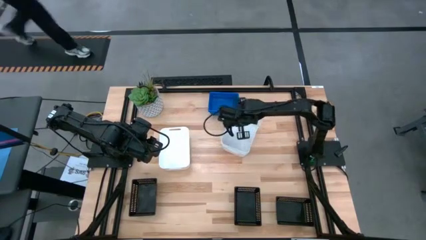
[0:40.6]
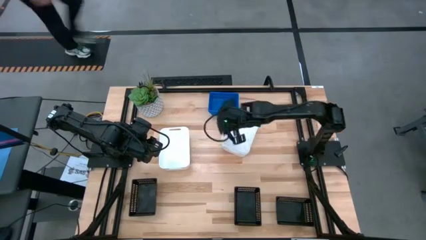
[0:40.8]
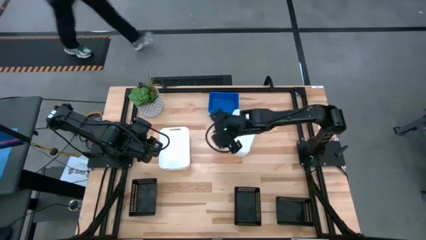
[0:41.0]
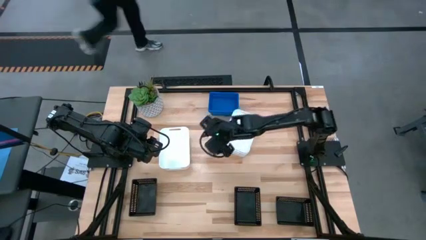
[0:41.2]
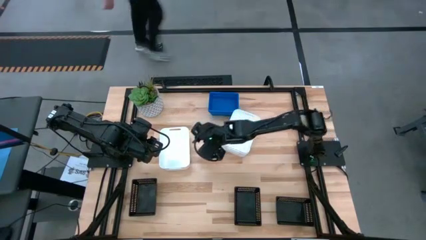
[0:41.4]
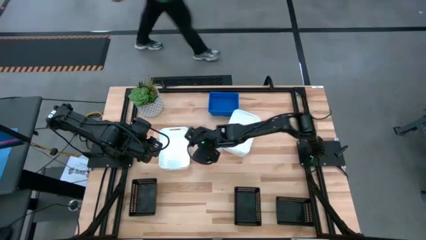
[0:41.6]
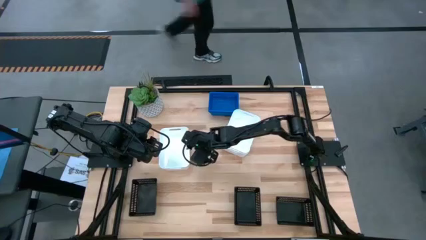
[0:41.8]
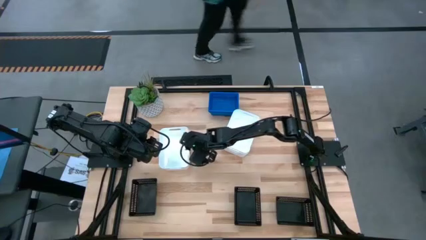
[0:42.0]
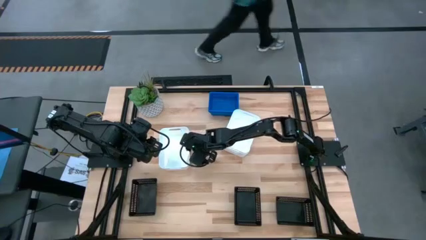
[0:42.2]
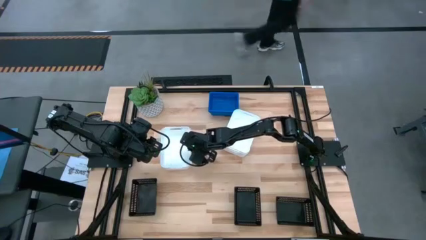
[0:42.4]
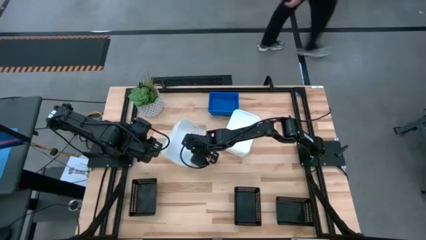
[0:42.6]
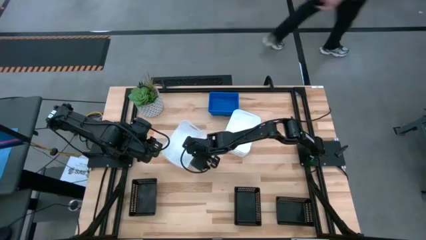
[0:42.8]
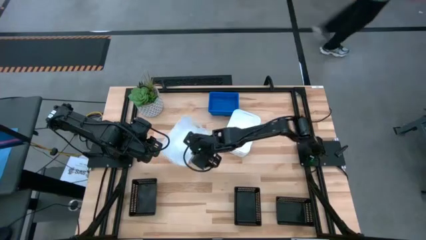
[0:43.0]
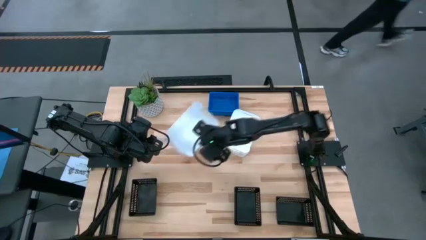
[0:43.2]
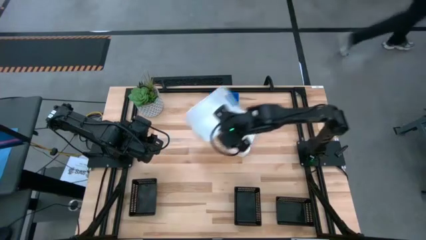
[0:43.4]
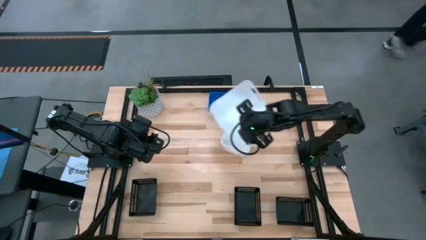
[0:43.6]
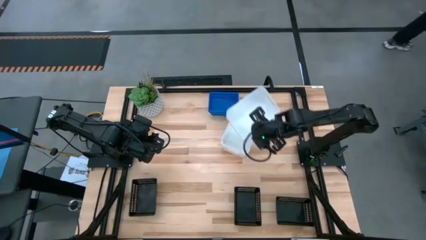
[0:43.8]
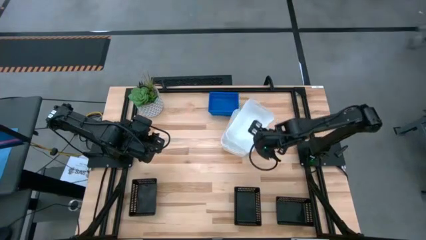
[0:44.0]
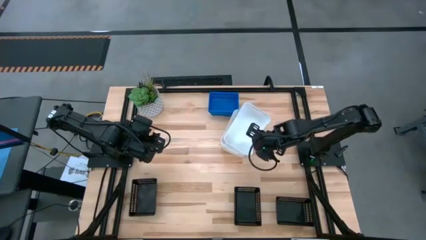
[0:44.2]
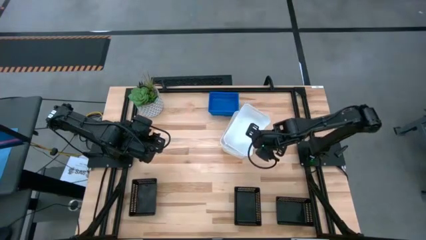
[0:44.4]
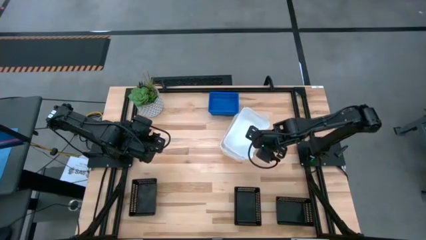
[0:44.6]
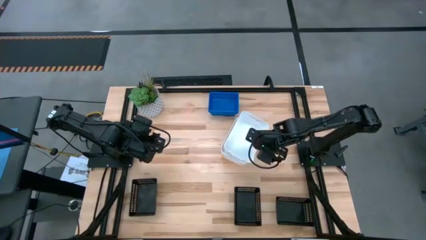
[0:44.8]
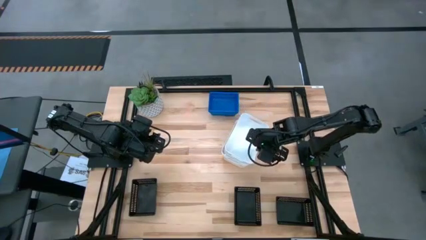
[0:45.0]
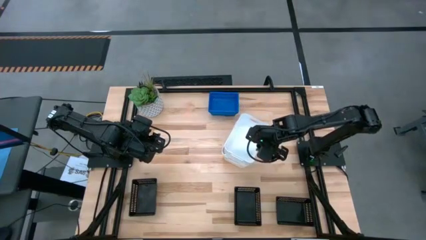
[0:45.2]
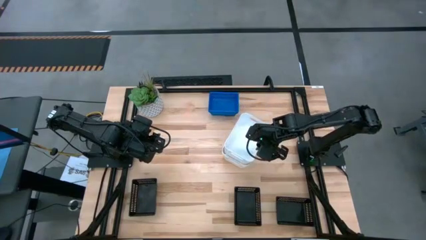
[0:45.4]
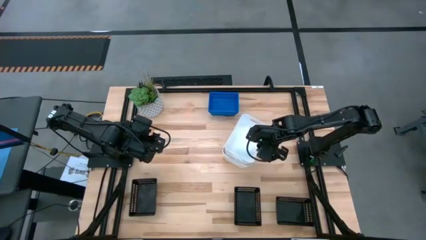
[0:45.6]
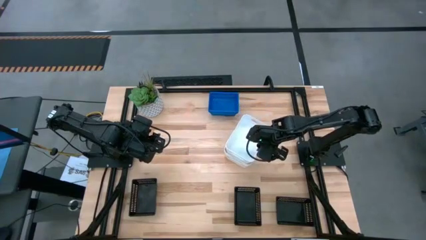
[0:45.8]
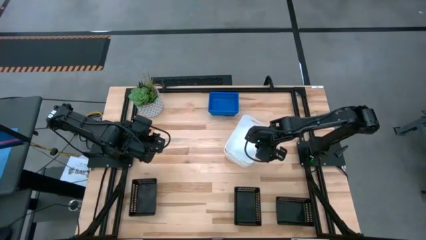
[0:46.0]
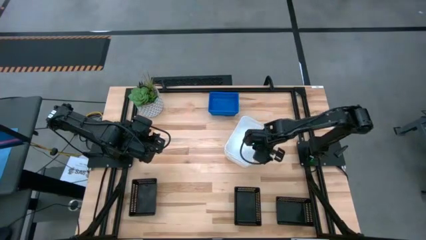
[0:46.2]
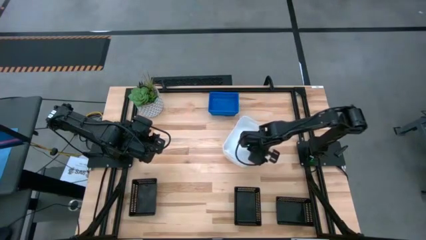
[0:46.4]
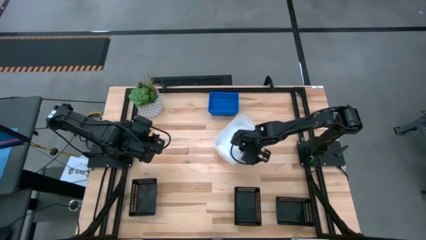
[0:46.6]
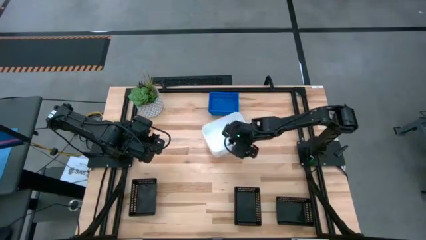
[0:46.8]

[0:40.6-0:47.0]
Stack the left white bin on the white bins

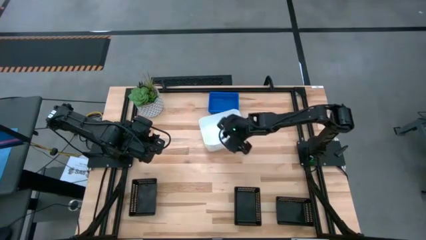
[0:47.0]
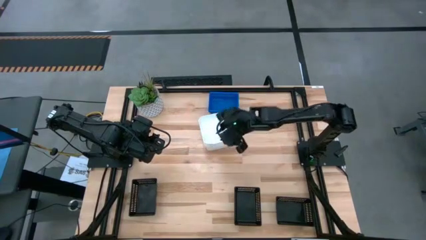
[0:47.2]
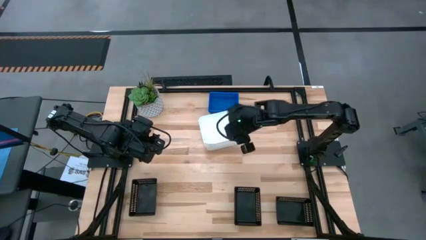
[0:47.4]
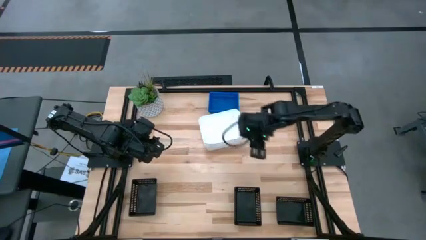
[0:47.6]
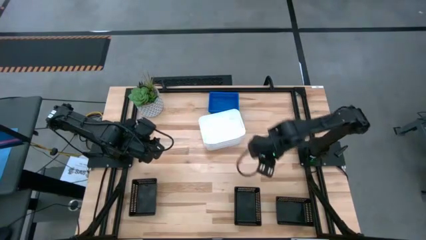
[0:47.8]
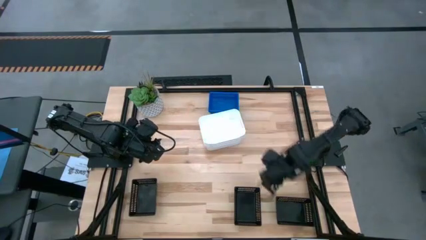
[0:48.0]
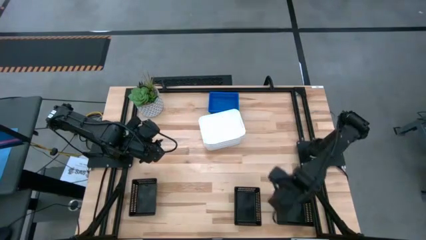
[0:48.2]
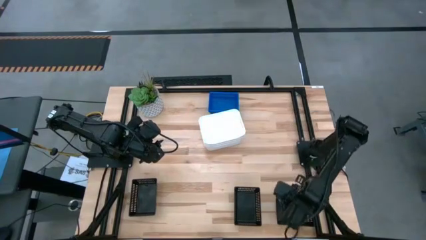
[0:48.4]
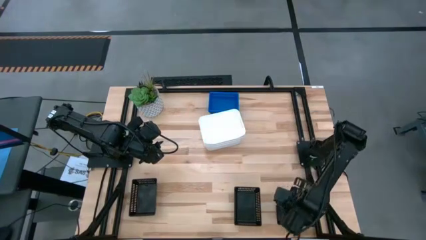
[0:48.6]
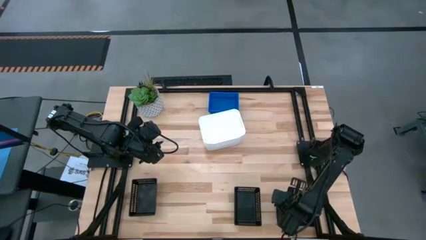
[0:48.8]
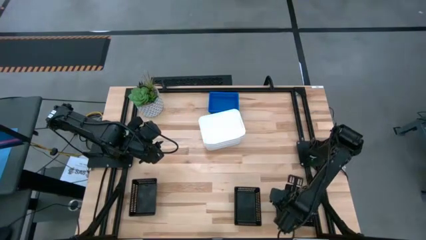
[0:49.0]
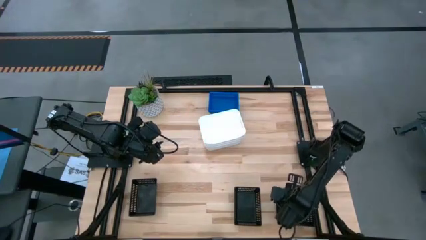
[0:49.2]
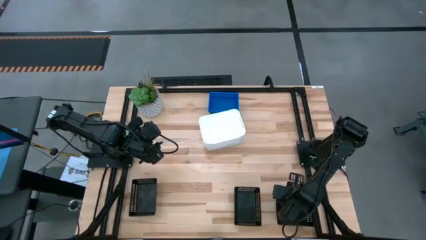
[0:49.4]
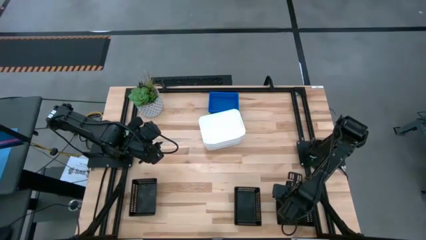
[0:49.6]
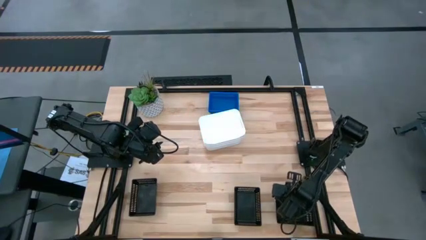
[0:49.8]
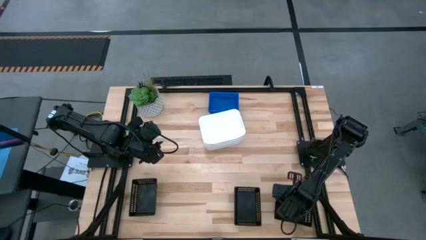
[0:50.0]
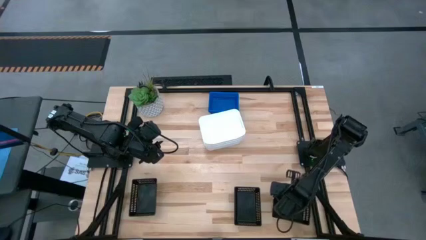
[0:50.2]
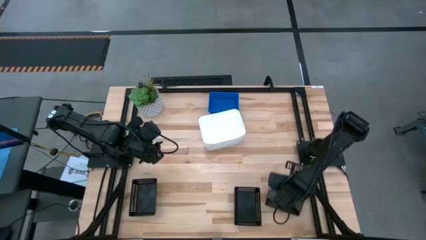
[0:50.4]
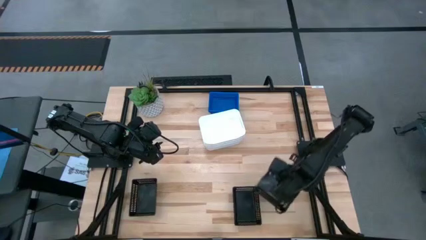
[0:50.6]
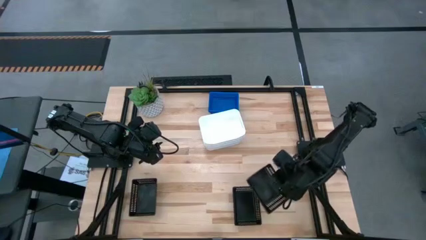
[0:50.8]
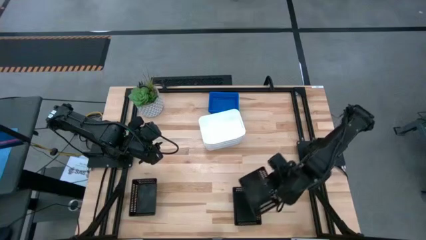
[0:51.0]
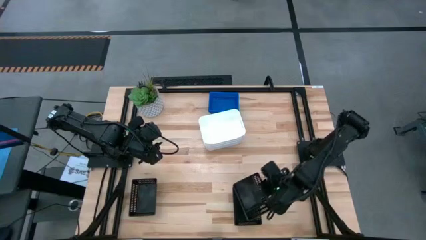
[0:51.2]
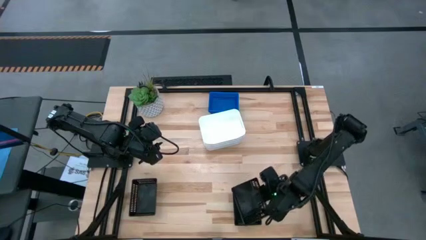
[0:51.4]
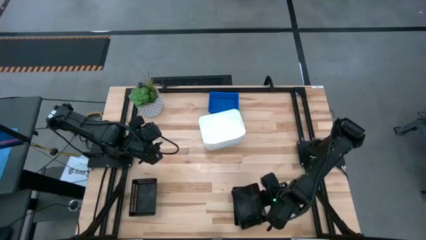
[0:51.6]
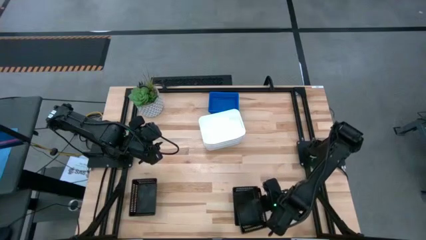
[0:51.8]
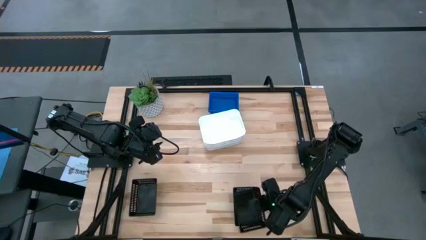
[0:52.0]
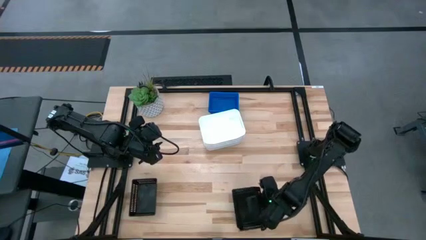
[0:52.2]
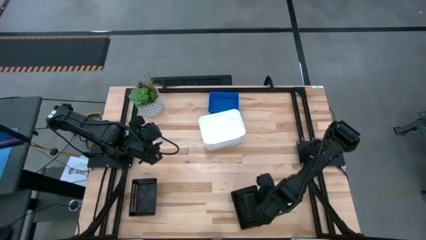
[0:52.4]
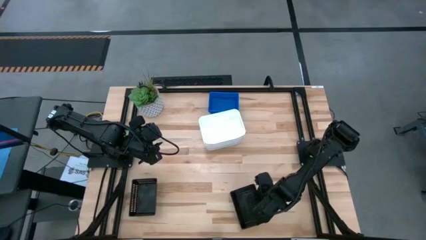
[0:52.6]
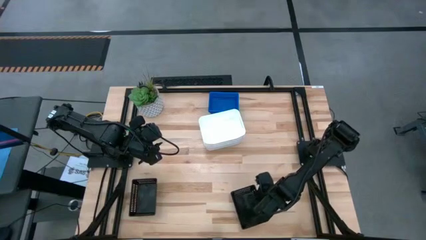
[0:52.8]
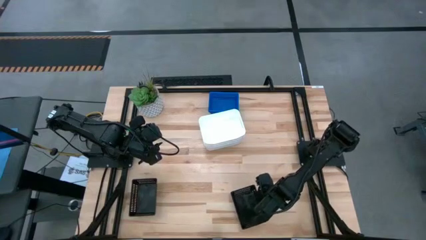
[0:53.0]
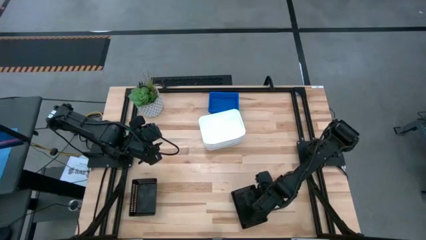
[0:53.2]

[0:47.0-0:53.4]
Stack the right black bin on the right black bin

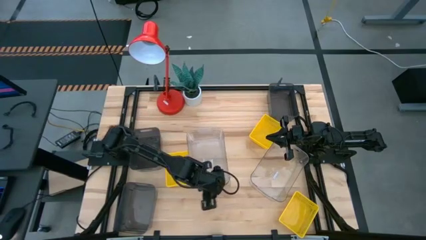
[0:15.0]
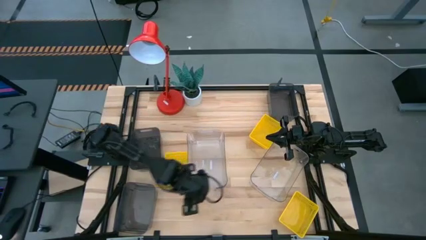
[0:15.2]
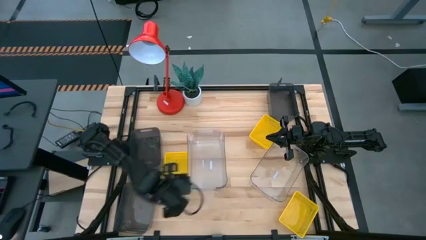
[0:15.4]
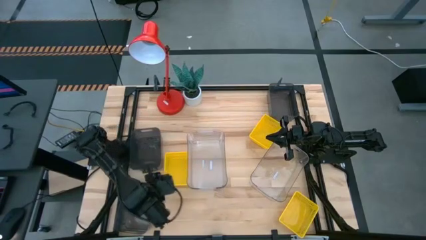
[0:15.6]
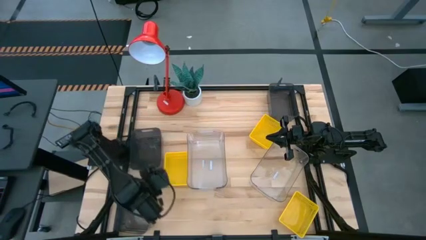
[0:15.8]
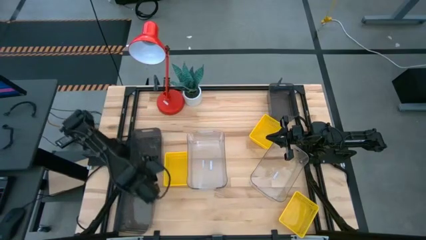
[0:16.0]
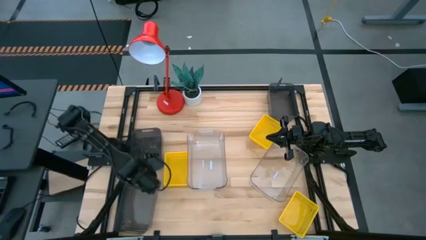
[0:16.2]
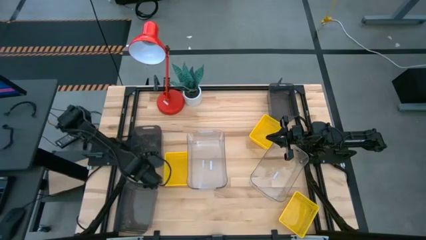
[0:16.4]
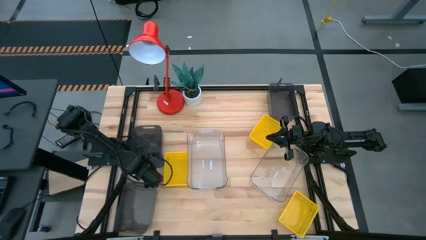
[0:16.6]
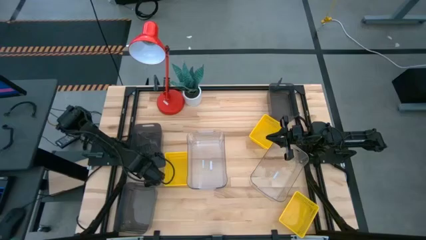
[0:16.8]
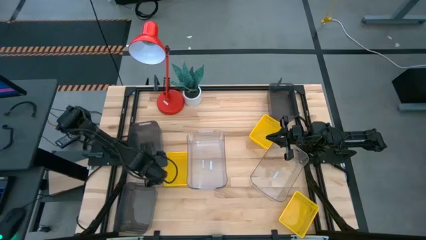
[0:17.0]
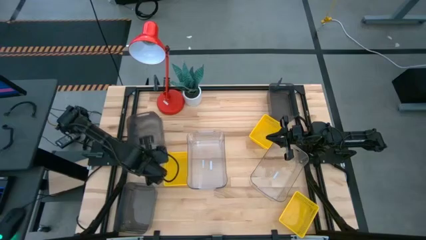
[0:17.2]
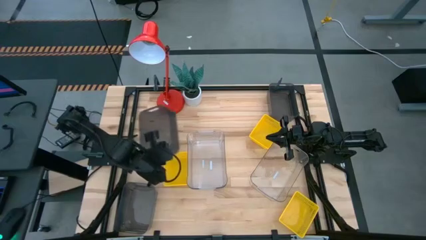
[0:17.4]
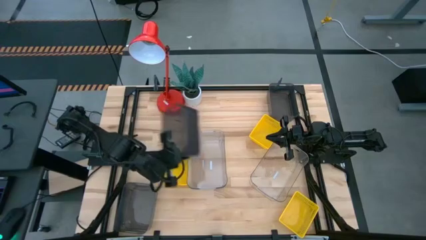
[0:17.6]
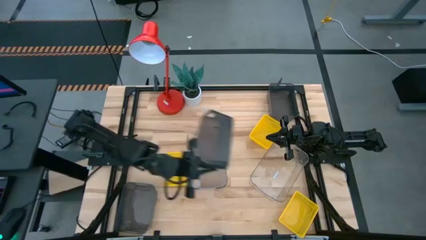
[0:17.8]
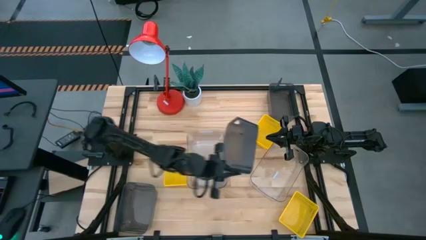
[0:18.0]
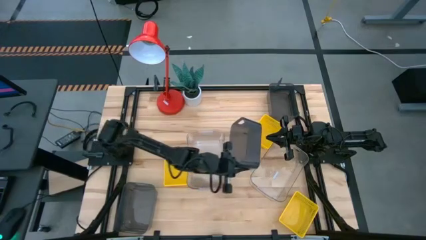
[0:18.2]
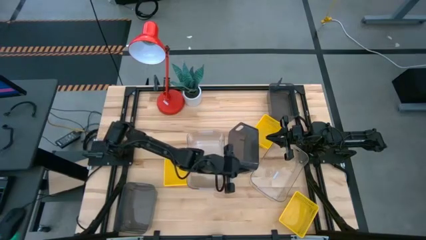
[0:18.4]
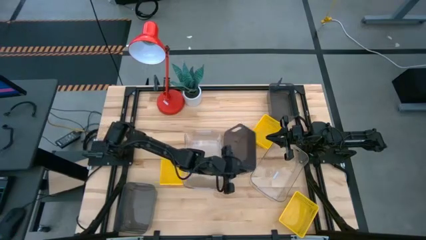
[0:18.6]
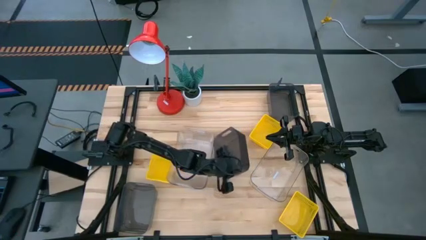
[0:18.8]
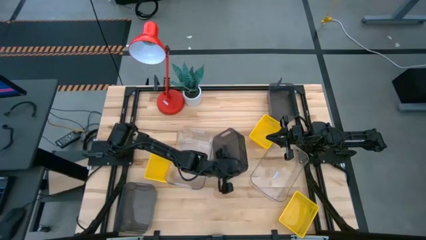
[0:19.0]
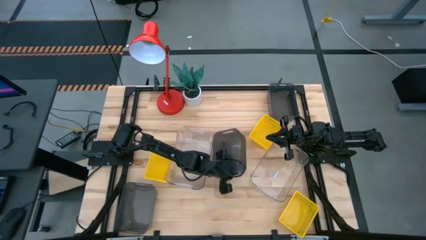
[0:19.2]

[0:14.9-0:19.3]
Move the middle left black bin to the middle right of the table
